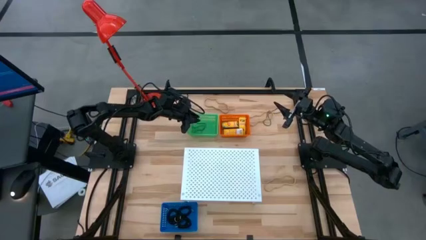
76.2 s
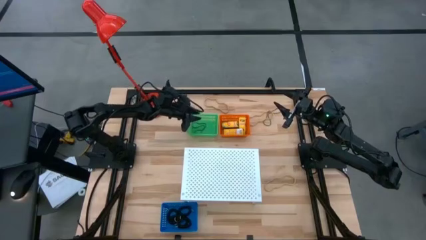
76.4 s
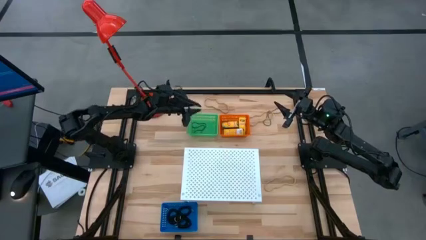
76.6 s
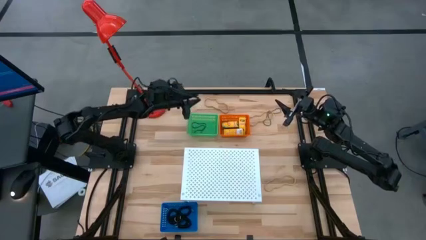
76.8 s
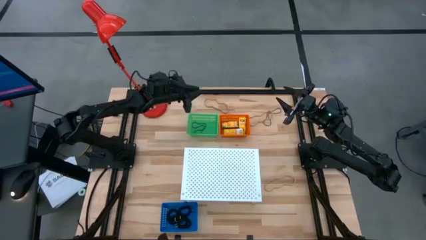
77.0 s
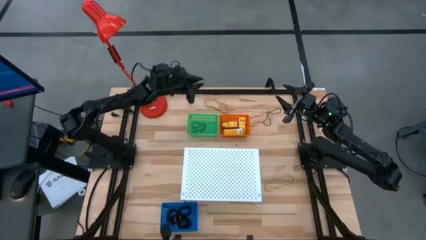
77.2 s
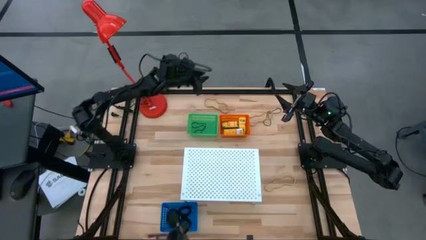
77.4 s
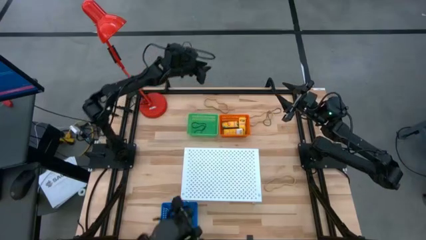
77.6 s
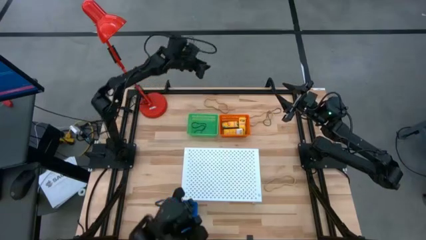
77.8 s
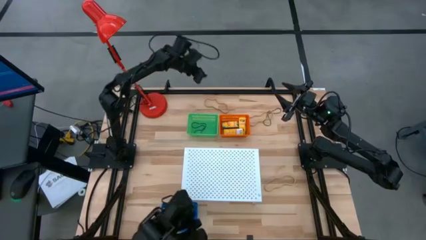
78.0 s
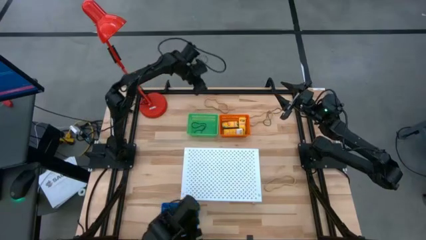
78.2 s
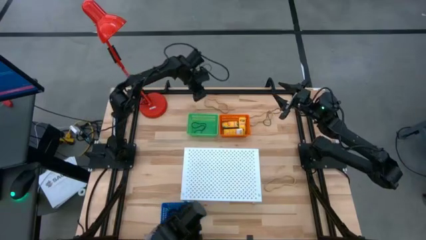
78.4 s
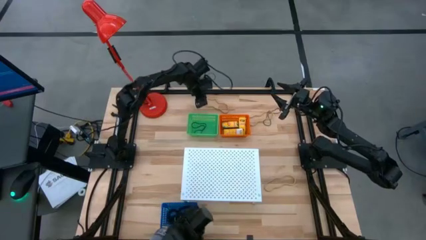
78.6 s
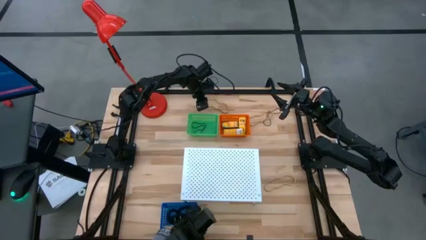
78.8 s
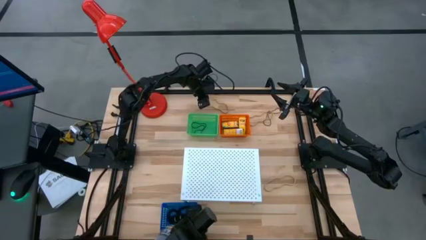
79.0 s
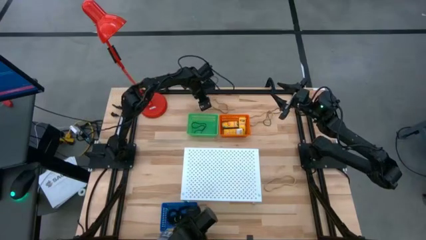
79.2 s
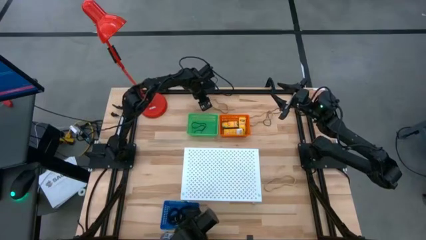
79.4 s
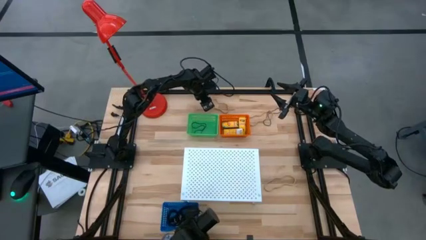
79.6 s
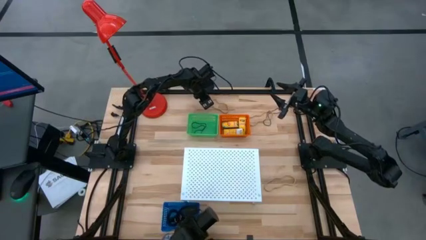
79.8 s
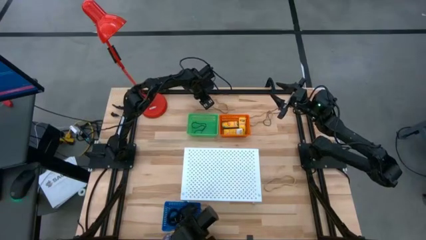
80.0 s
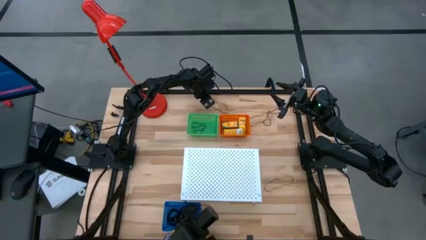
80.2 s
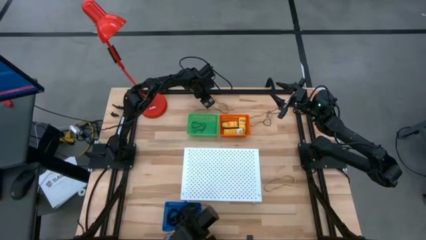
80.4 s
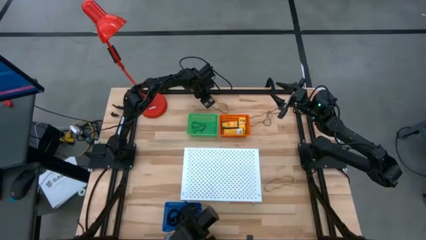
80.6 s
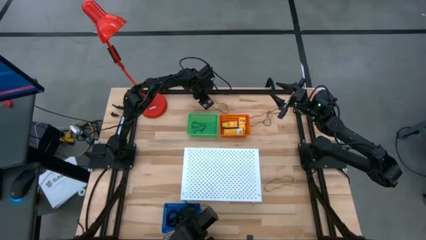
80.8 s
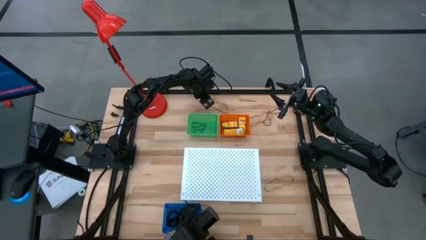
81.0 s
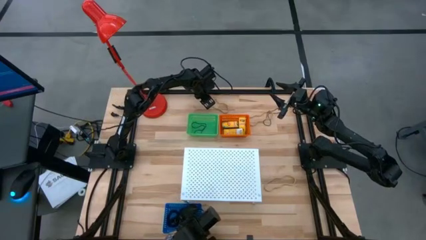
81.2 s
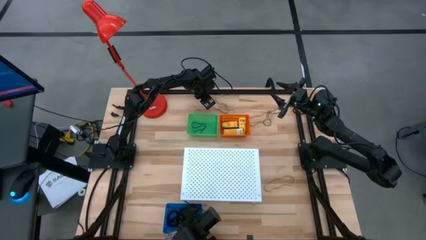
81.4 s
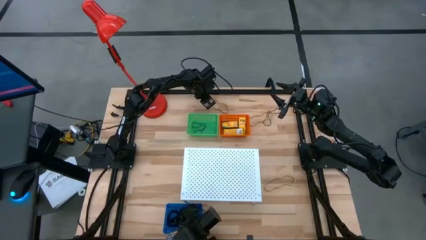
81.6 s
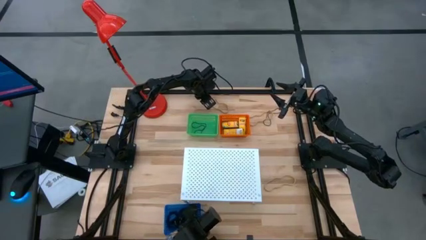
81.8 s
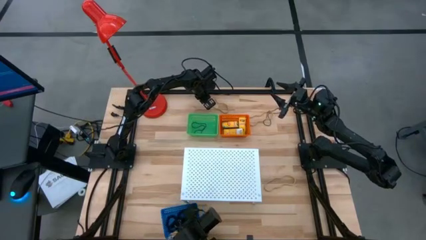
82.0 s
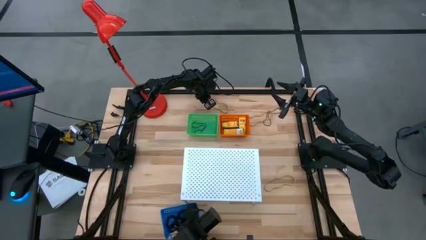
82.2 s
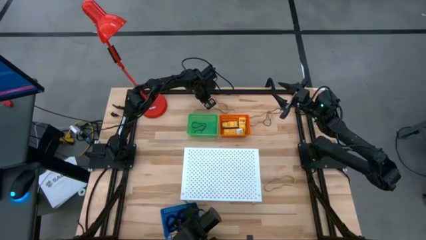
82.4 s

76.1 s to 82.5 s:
Task: Pick & Place Office Desk Supplies
Put the brown rubber band into the green bin

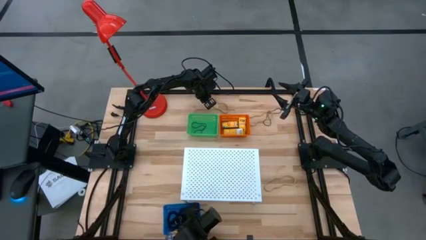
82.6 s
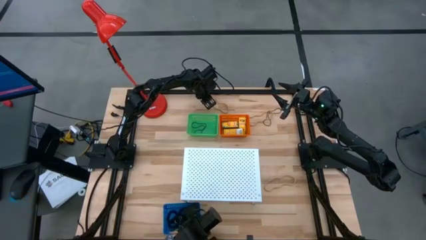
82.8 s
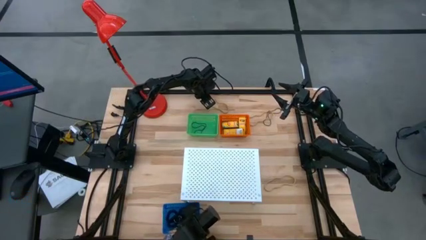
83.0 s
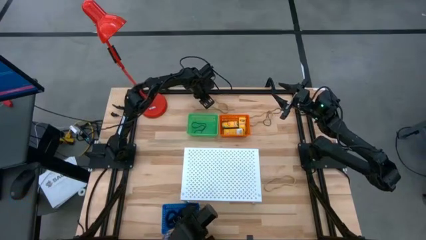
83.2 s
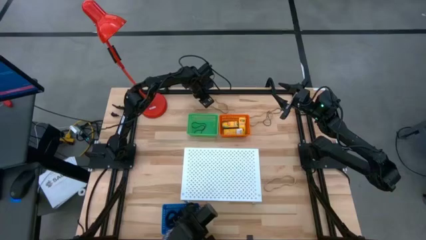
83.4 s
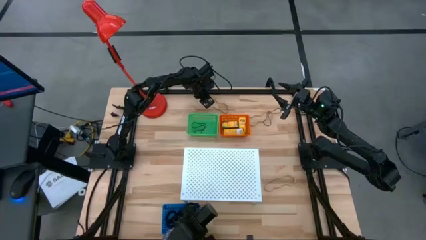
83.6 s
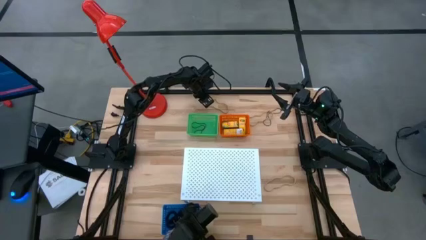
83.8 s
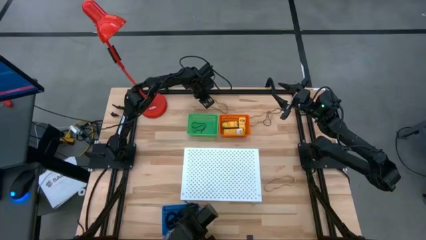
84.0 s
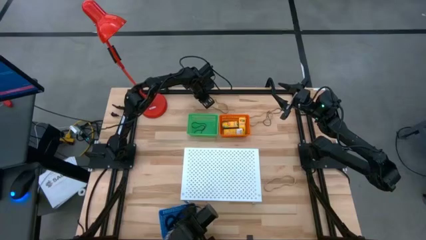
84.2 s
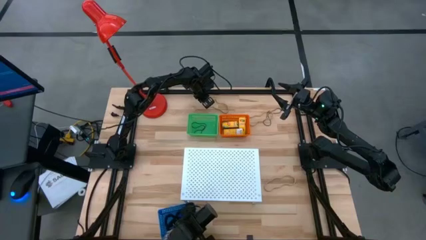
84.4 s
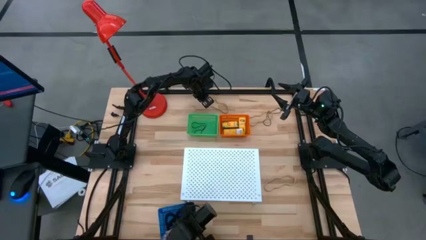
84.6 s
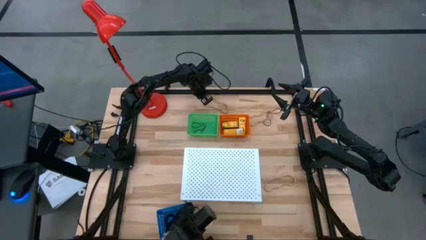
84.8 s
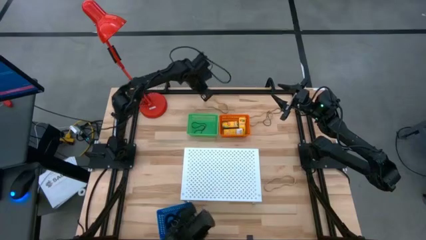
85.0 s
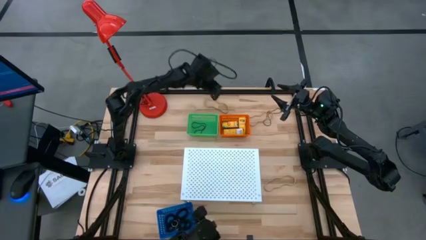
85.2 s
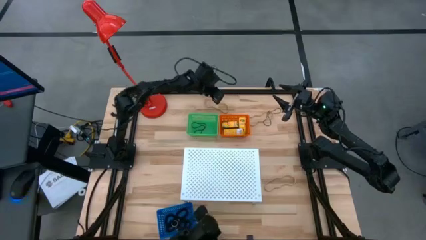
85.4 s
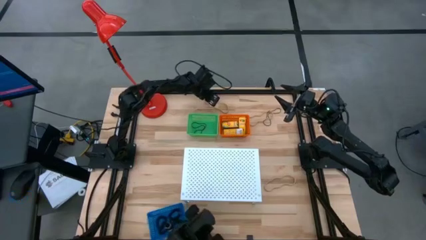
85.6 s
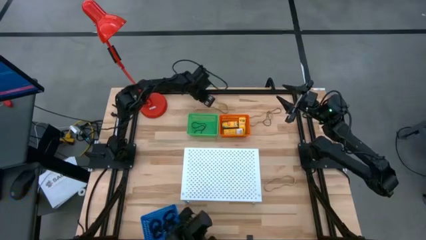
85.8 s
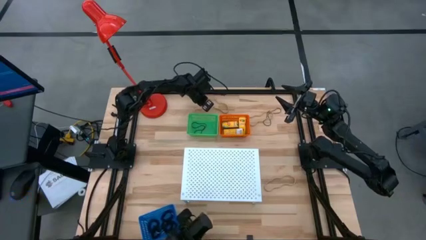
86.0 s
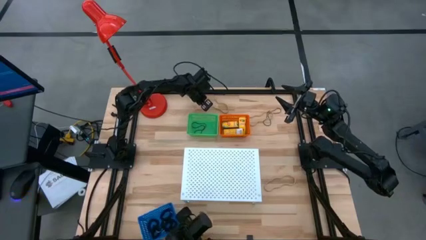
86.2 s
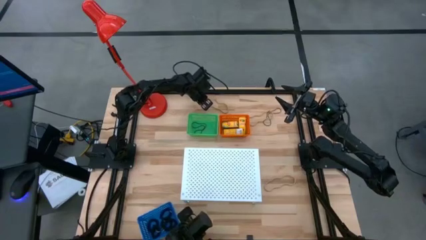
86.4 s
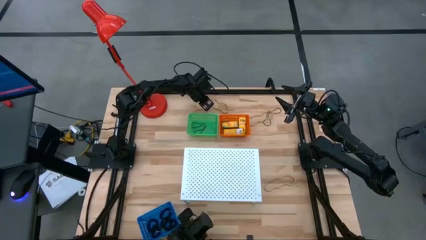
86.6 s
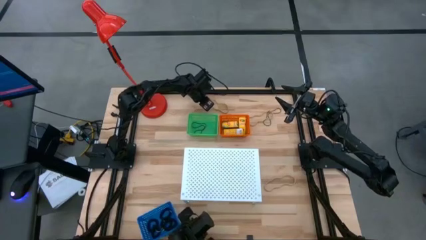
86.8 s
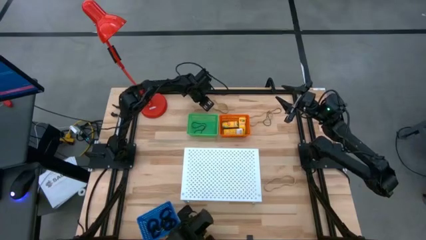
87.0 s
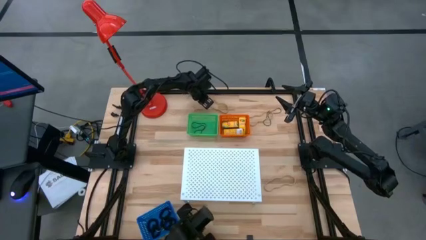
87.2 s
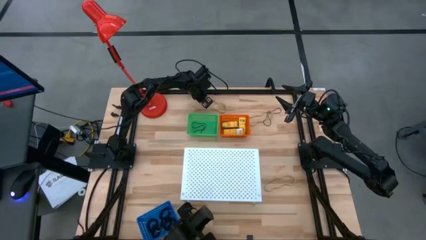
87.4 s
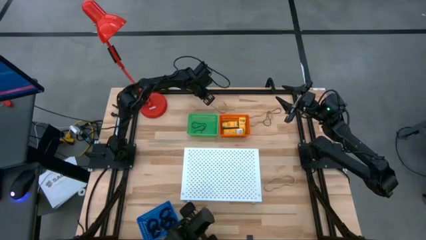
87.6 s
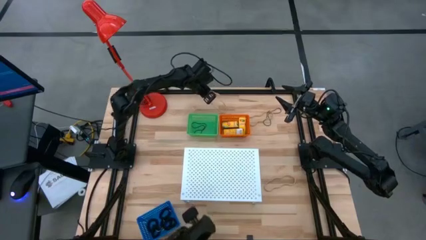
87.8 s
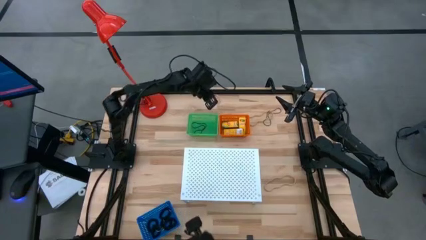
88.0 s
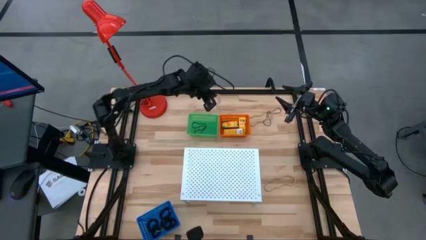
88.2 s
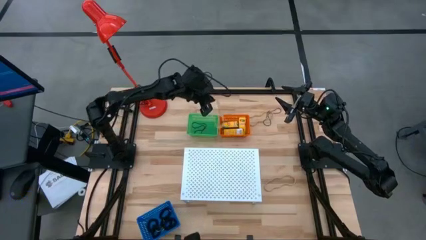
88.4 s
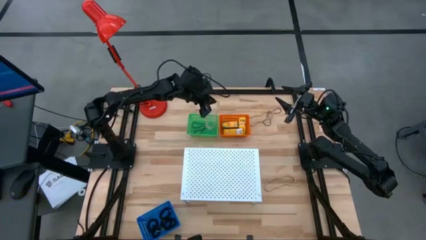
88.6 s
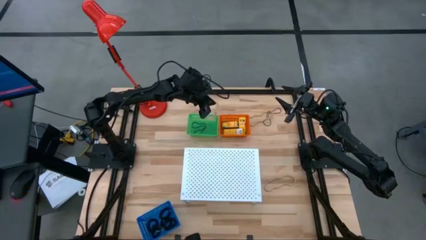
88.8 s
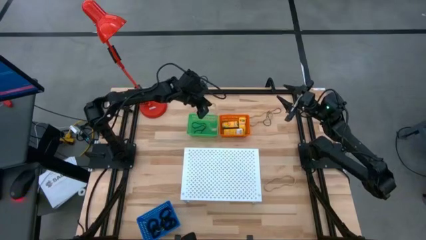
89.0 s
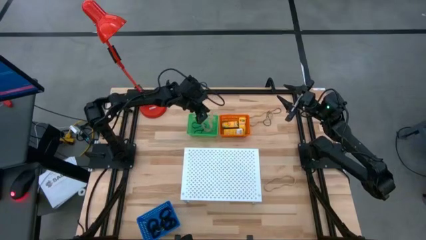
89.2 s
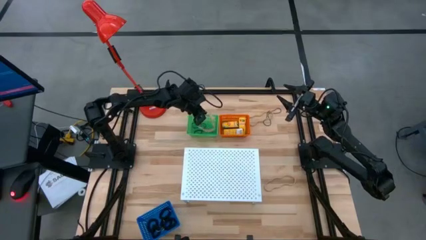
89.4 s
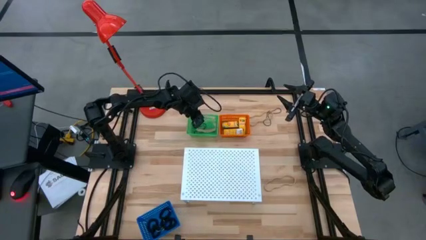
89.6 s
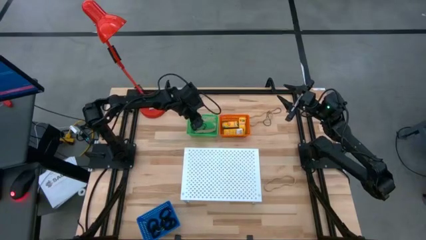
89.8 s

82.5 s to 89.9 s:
Put the brown rubber band into the green bin
